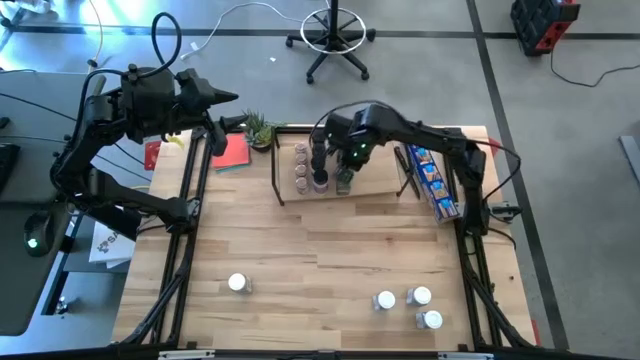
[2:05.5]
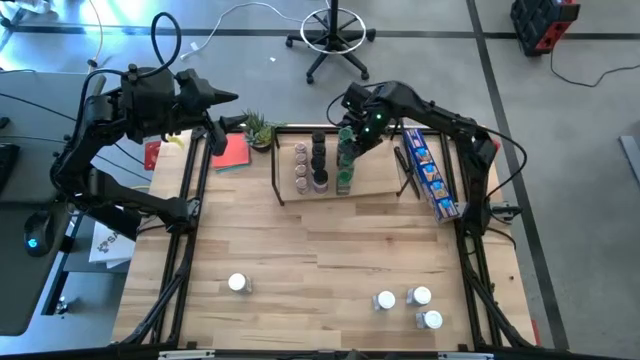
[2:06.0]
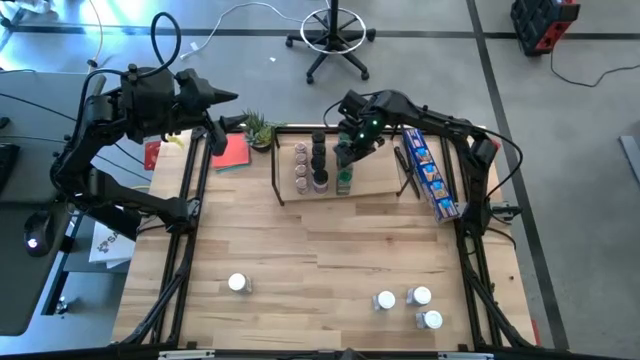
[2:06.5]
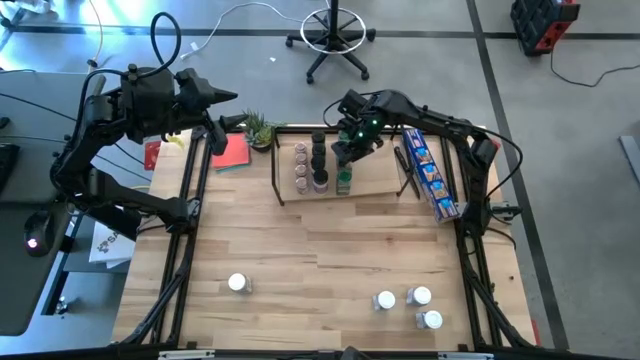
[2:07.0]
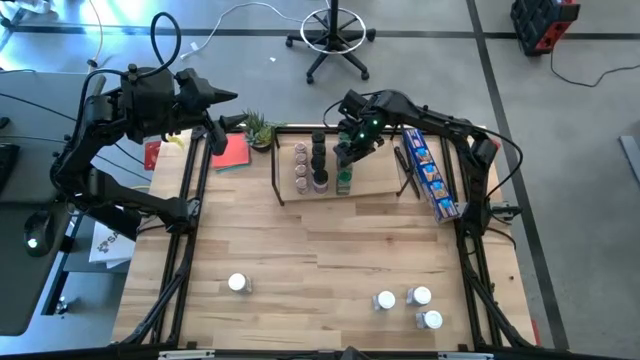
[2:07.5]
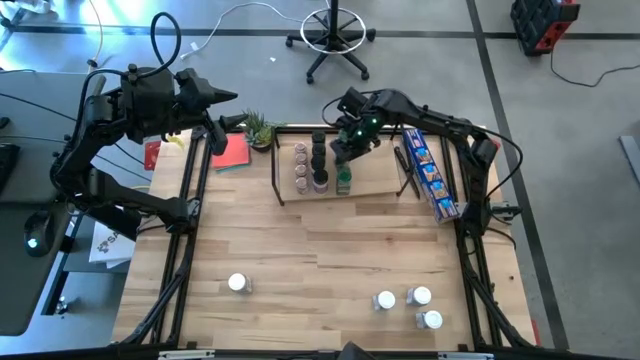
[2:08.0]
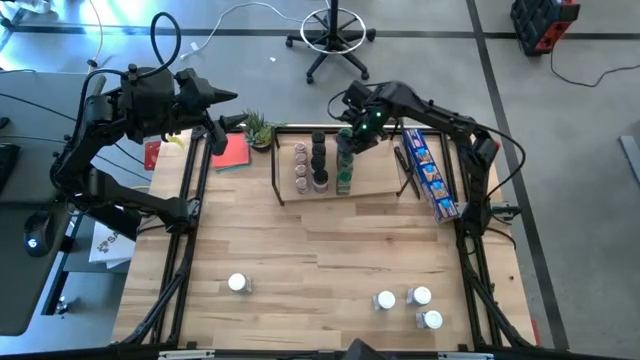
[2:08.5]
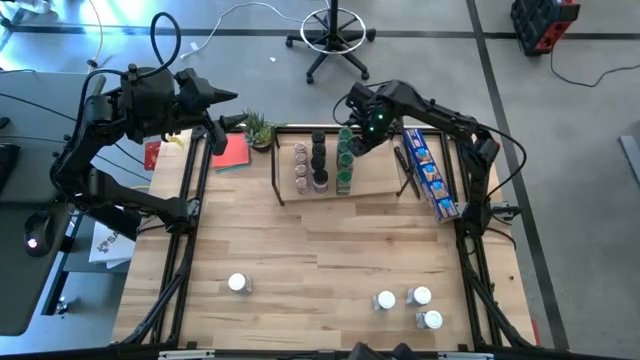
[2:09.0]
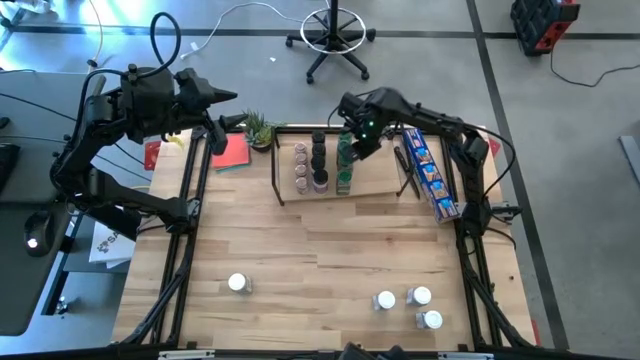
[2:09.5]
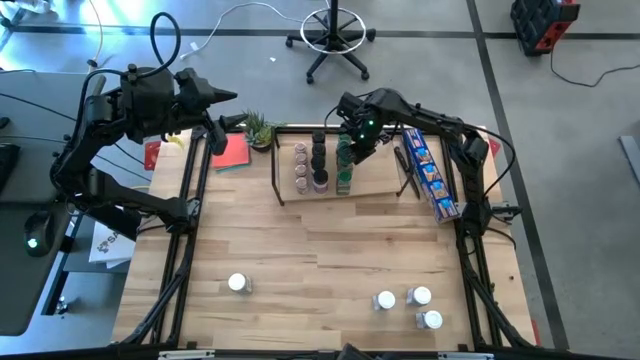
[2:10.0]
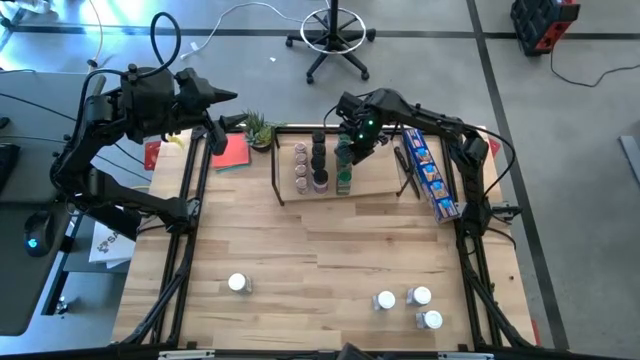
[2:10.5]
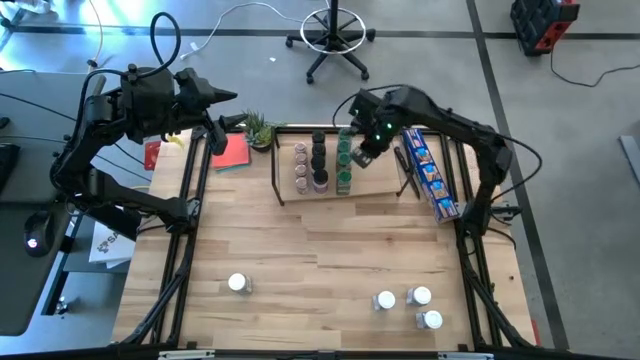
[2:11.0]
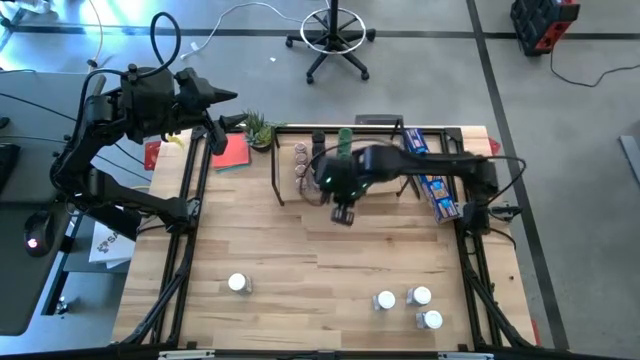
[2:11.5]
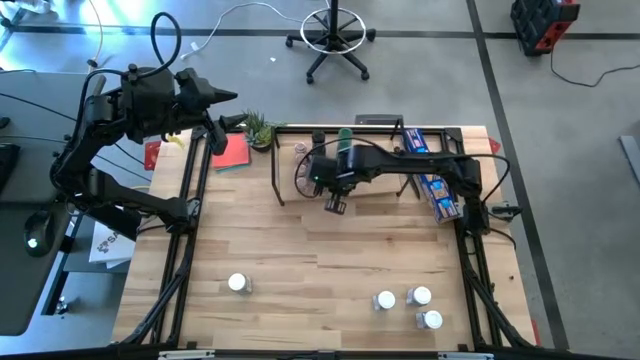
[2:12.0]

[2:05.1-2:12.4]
Task: Shelf spices
Adjust the green seasoning bottles on the shelf

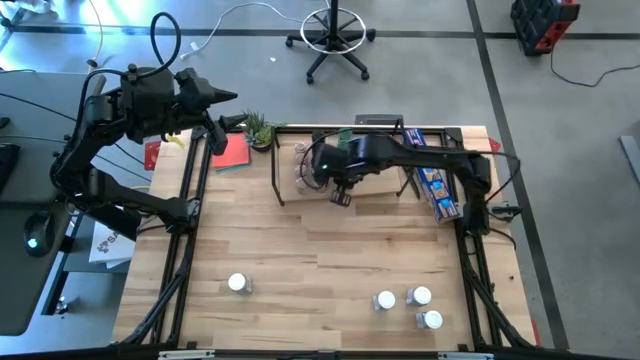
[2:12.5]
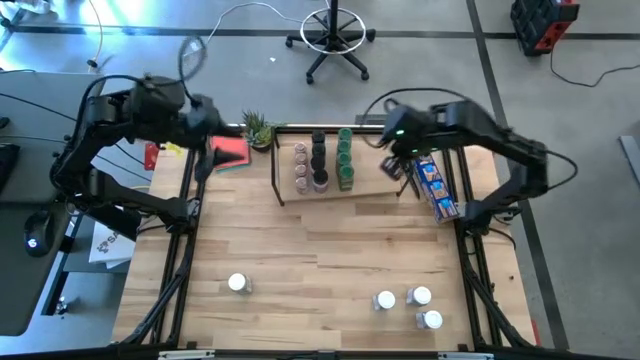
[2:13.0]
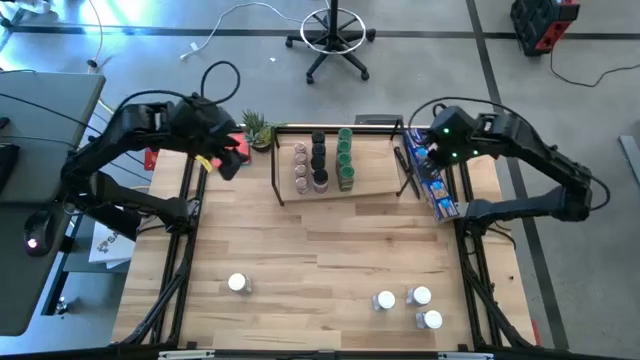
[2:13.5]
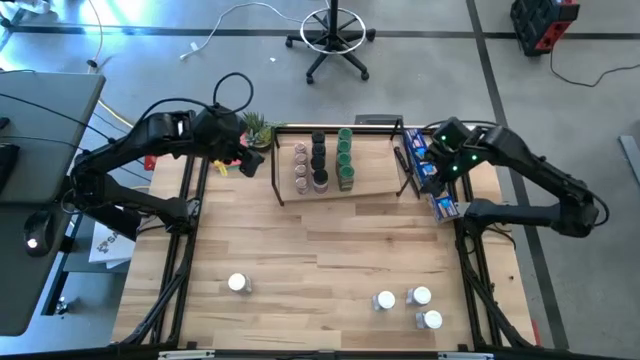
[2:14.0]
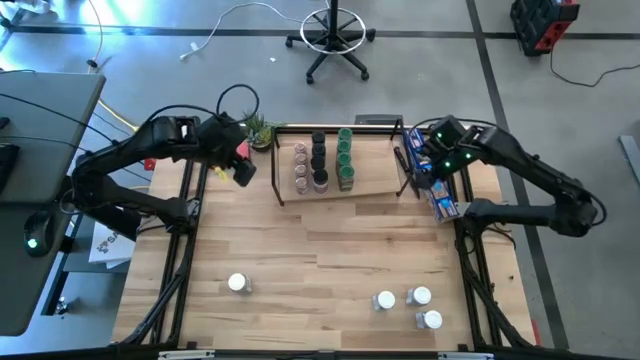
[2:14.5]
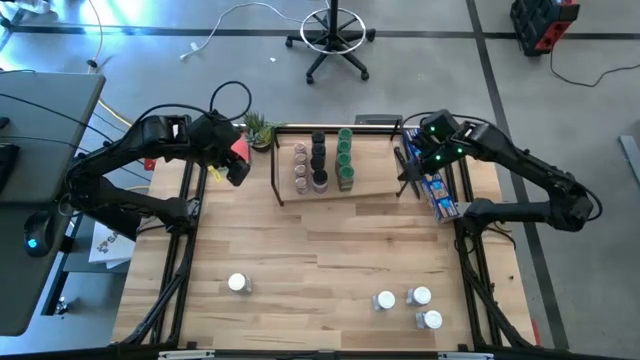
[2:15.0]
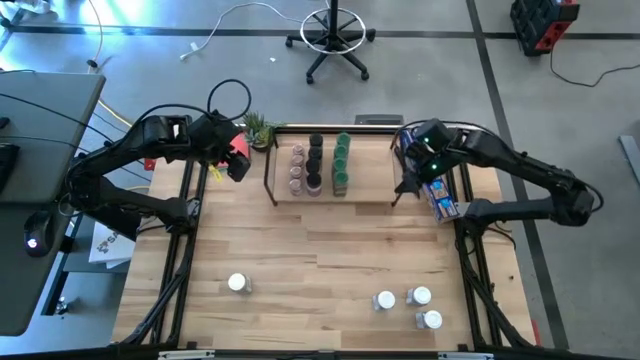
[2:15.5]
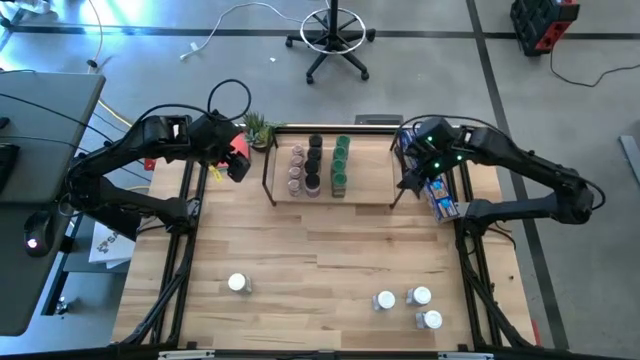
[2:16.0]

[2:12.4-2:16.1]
Adjust the shelf

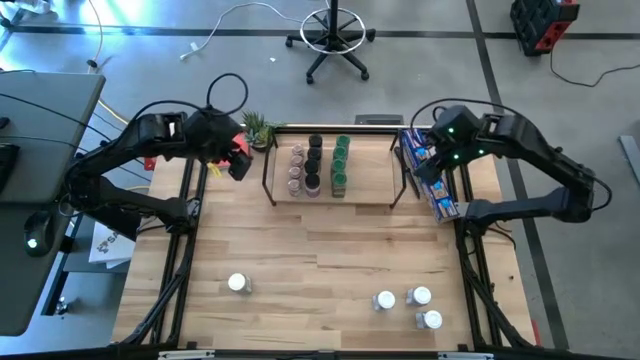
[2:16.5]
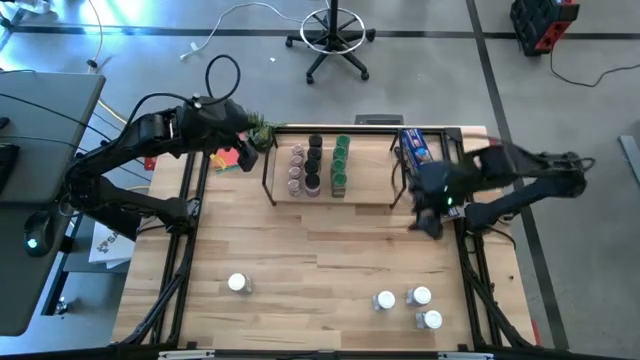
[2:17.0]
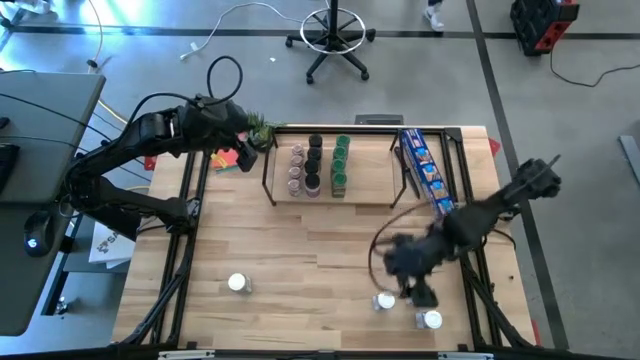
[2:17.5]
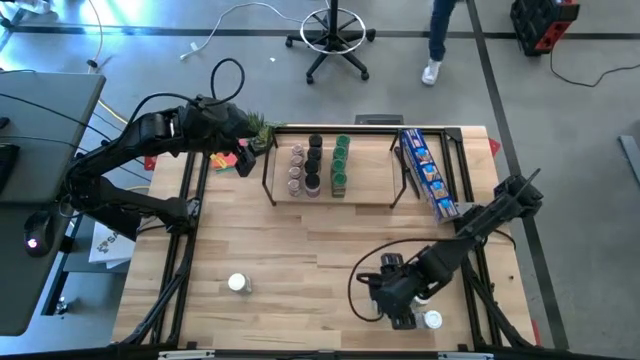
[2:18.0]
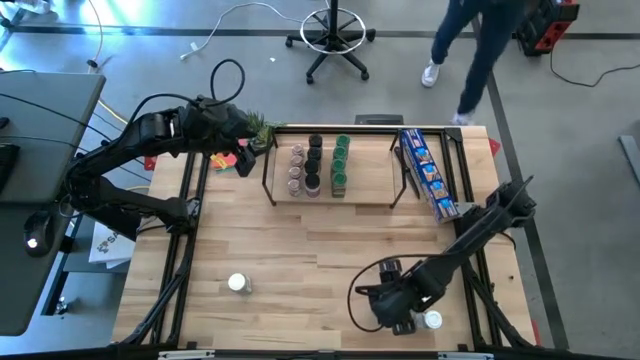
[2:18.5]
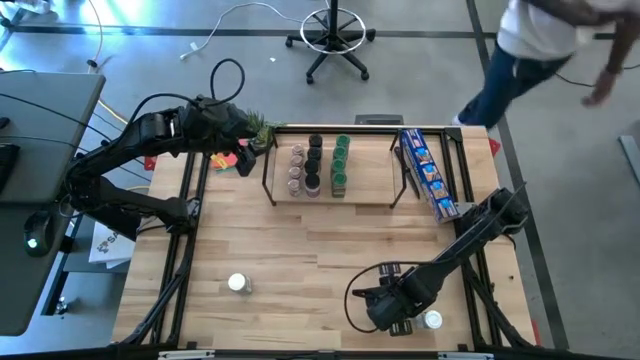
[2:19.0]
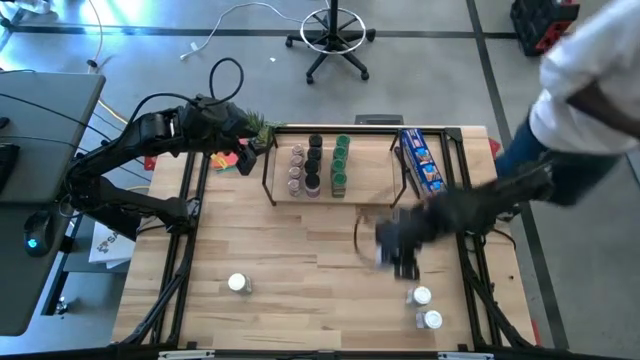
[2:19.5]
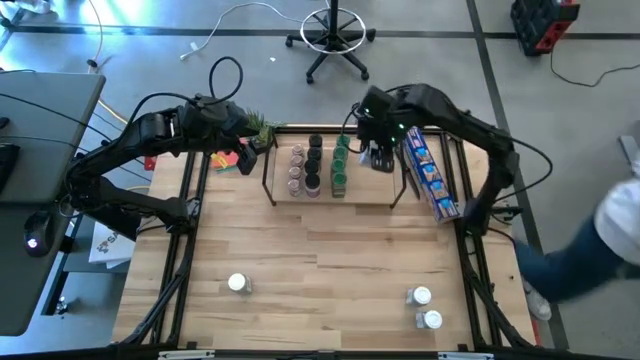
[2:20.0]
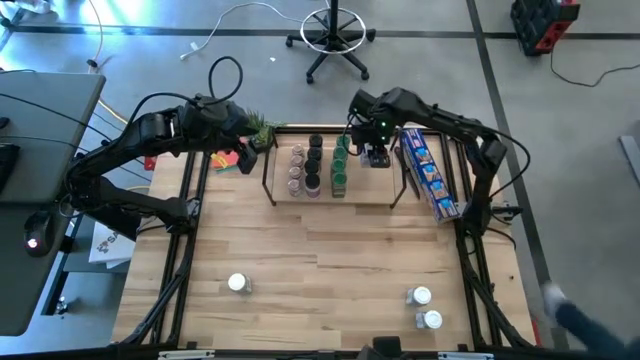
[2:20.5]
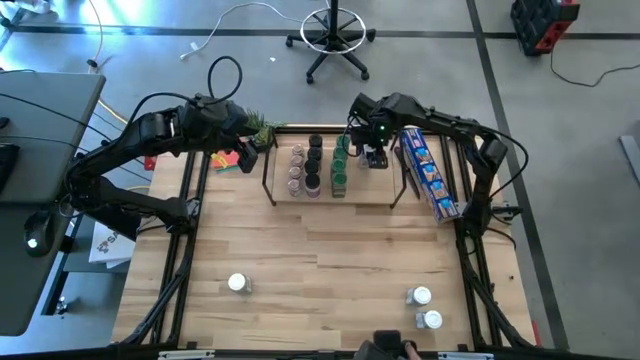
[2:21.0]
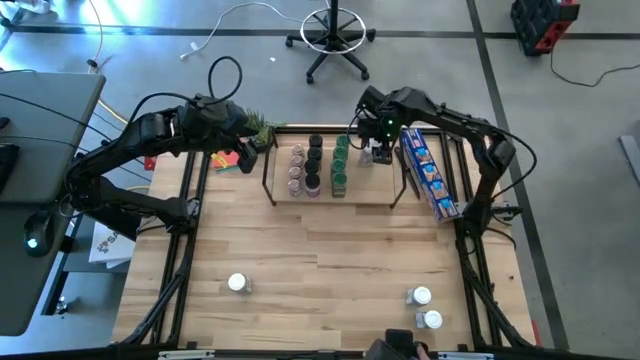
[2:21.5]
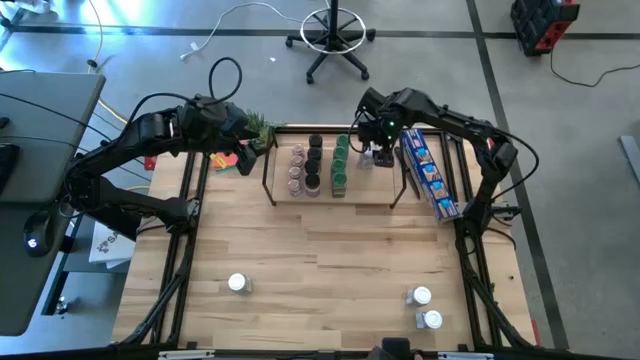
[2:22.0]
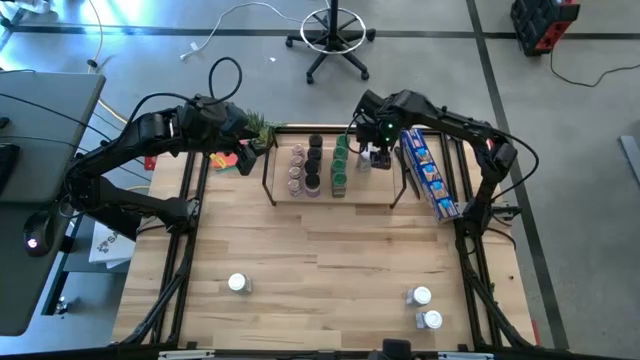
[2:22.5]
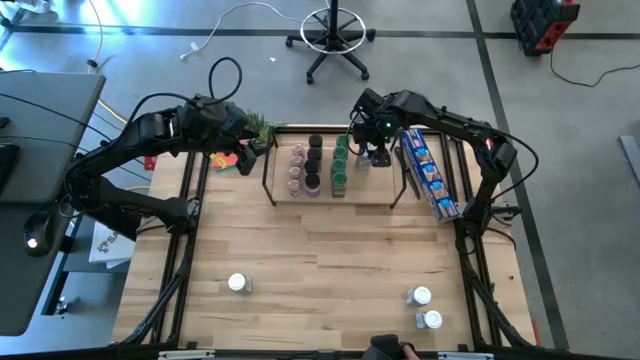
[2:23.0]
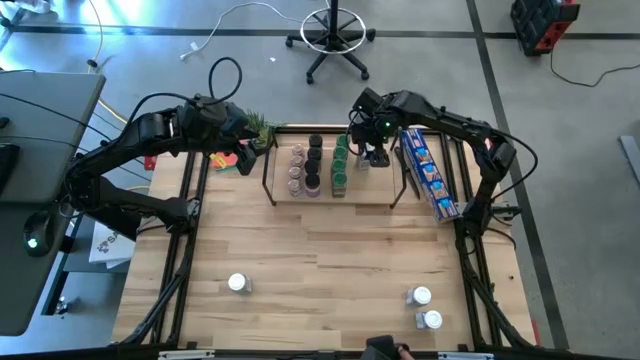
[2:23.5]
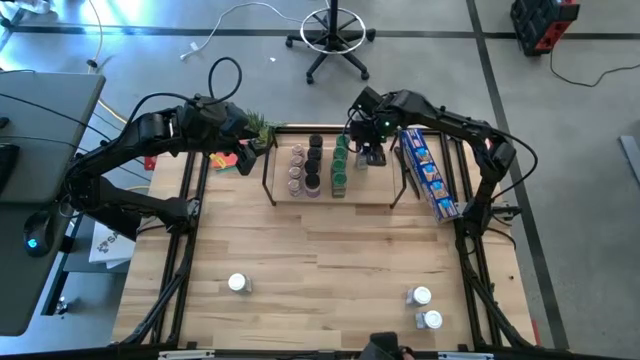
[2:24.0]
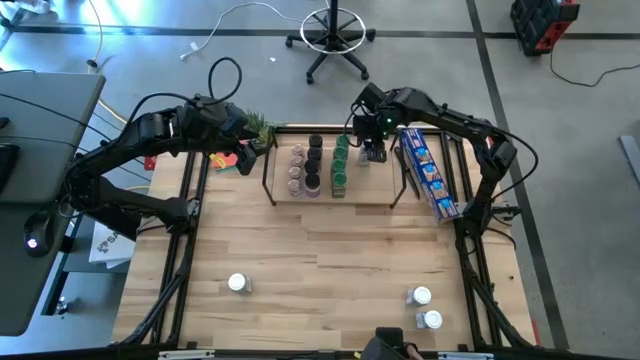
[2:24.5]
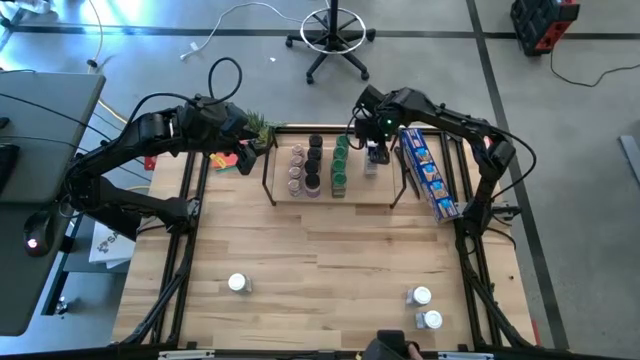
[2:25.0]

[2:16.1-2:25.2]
Put the white seasoning bottle on the shelf

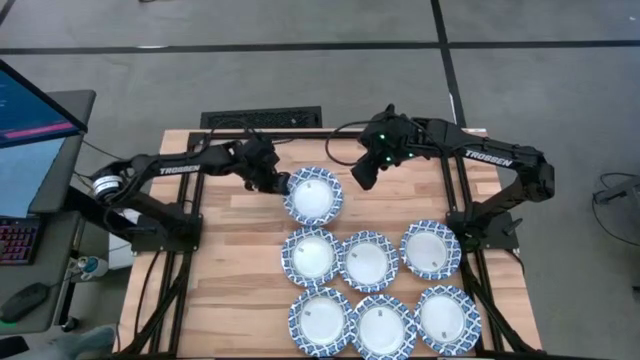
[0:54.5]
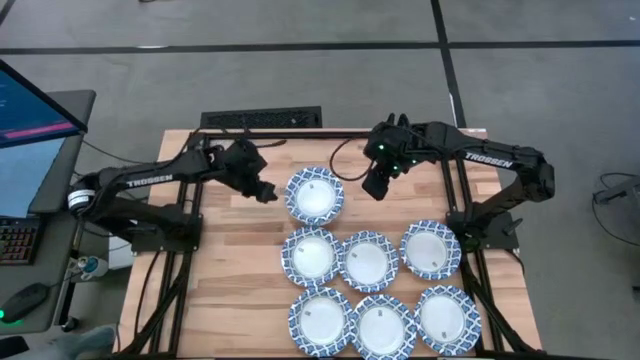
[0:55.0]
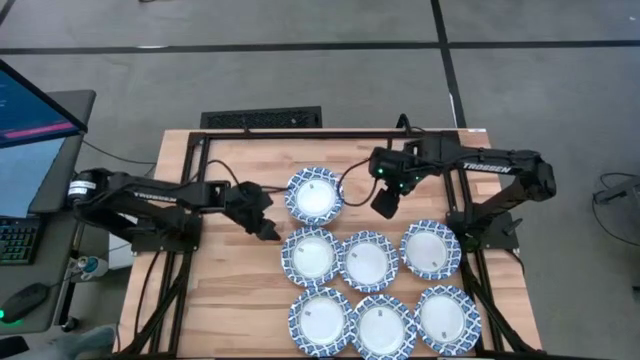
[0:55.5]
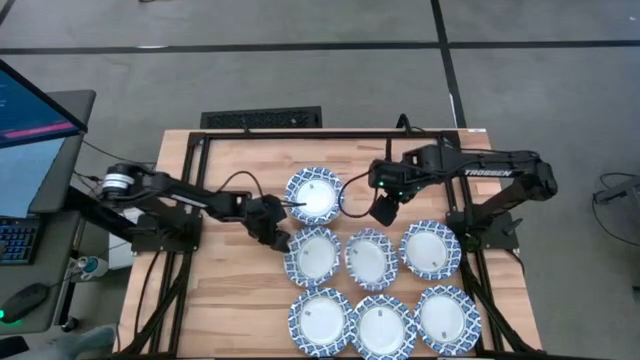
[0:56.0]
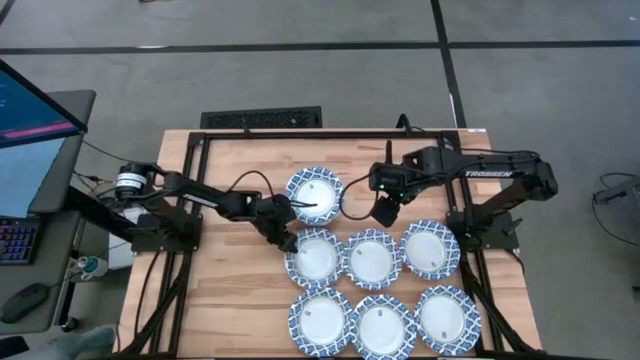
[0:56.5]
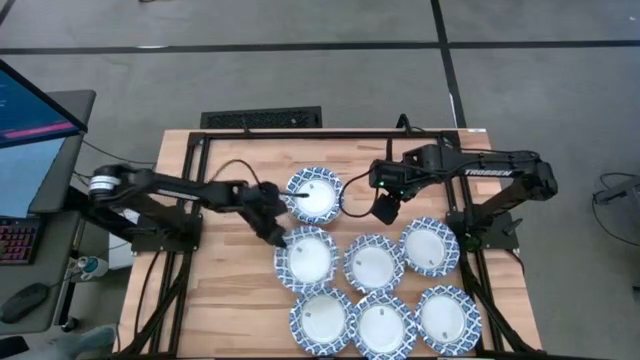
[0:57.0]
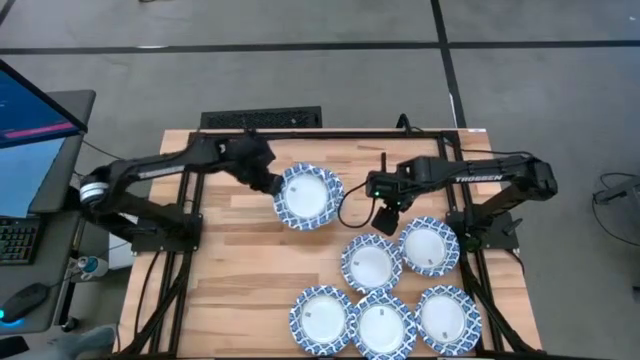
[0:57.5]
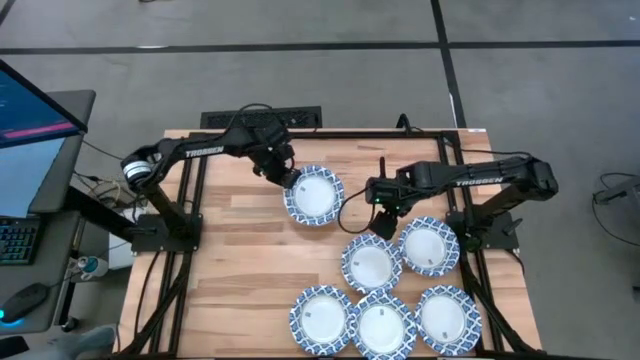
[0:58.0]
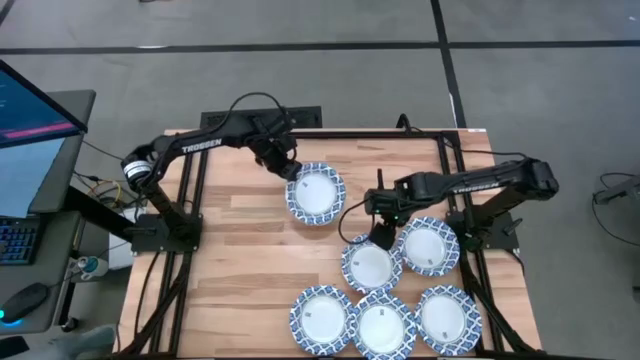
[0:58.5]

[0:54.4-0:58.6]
Task: Nest bowls inside each other
Stack the white bowl on the stacked white bowls
